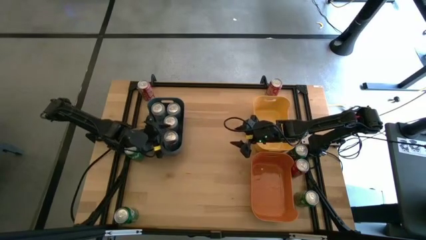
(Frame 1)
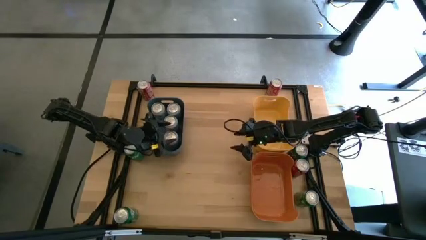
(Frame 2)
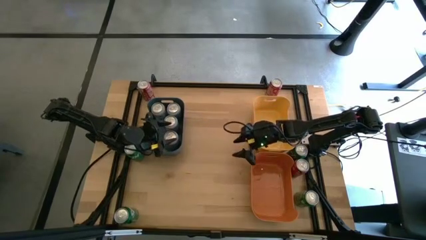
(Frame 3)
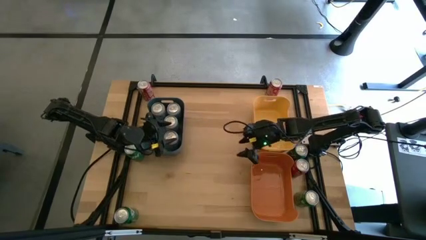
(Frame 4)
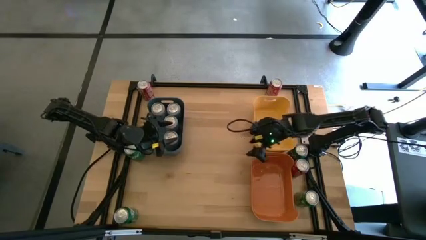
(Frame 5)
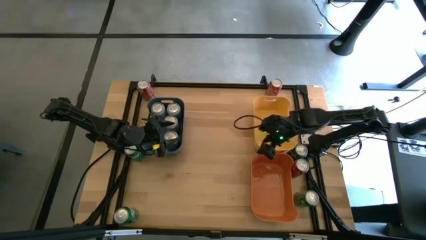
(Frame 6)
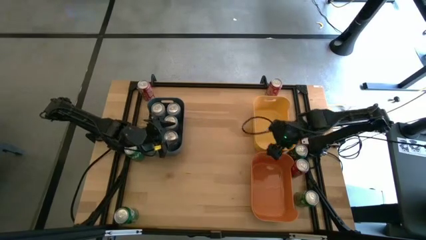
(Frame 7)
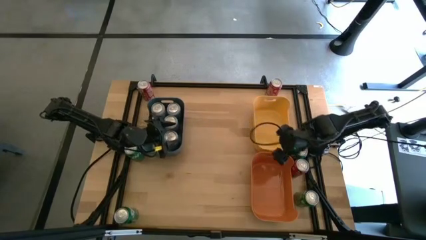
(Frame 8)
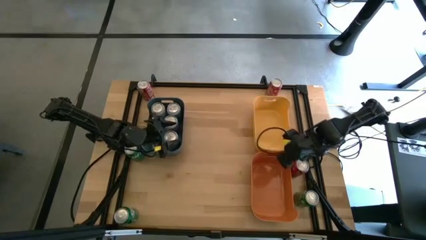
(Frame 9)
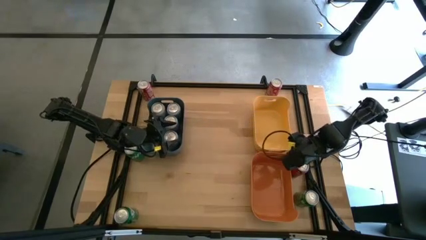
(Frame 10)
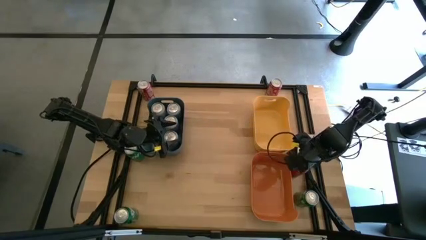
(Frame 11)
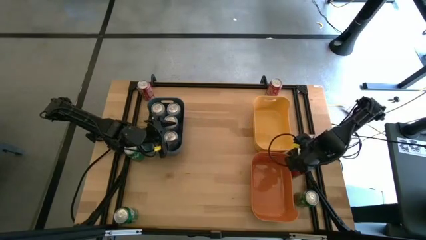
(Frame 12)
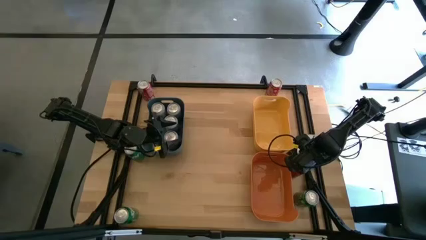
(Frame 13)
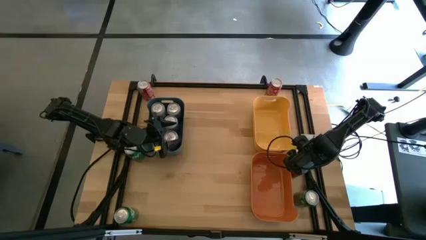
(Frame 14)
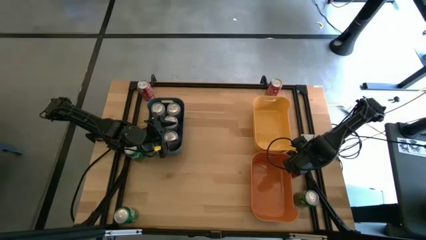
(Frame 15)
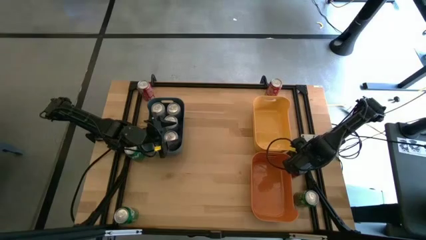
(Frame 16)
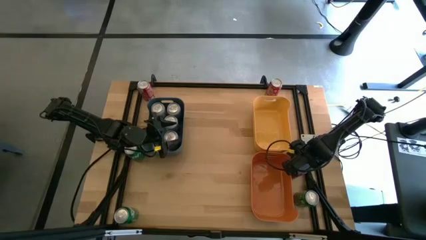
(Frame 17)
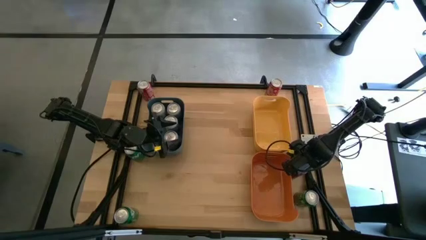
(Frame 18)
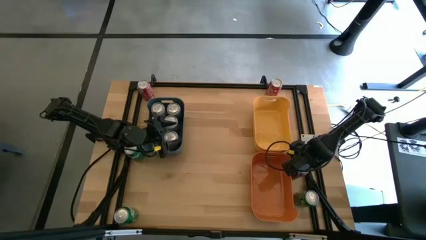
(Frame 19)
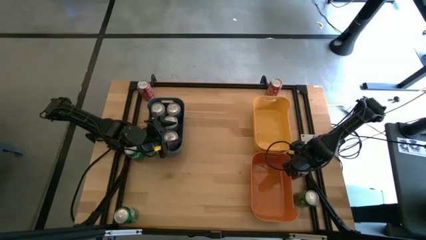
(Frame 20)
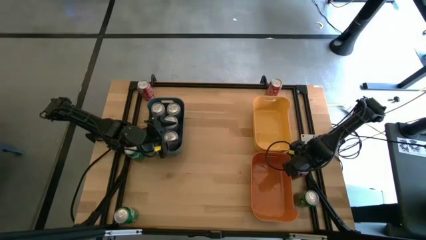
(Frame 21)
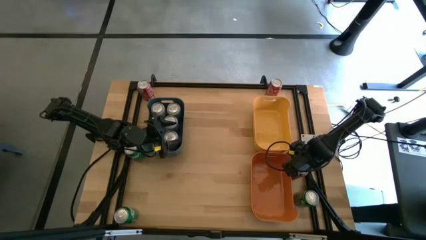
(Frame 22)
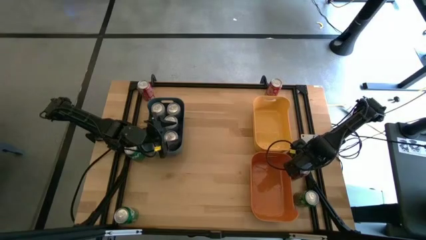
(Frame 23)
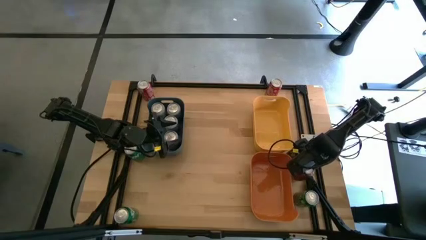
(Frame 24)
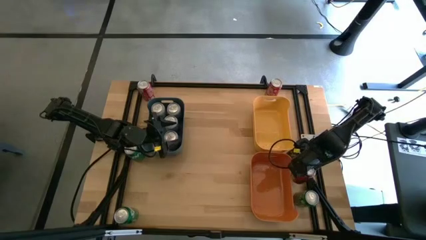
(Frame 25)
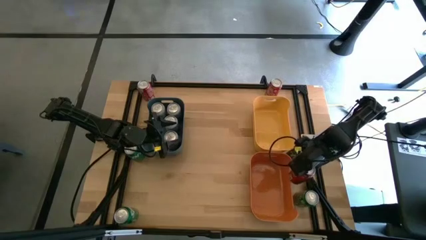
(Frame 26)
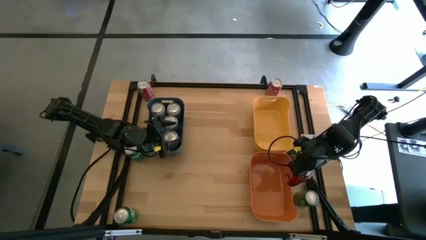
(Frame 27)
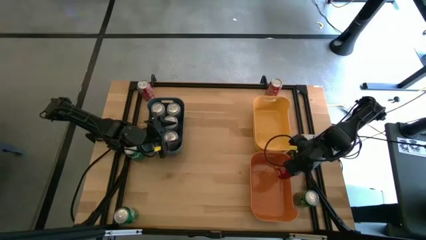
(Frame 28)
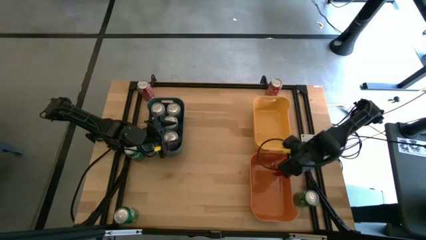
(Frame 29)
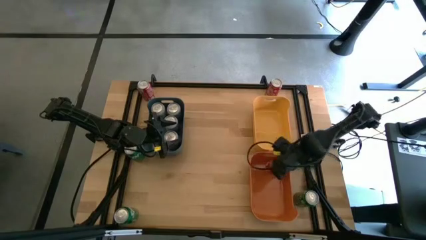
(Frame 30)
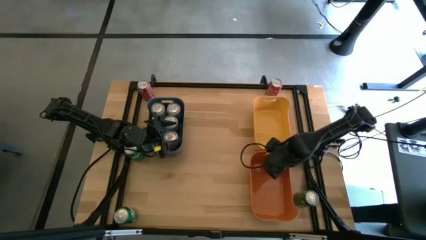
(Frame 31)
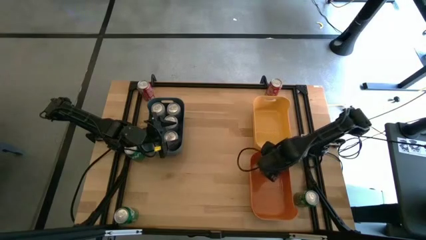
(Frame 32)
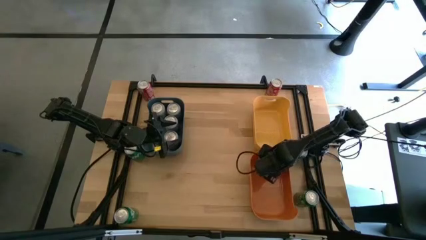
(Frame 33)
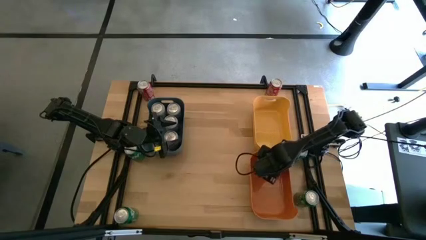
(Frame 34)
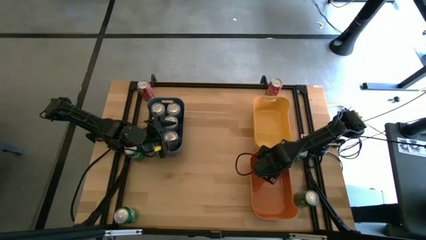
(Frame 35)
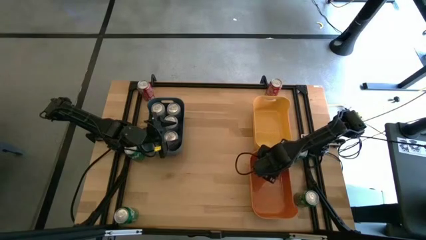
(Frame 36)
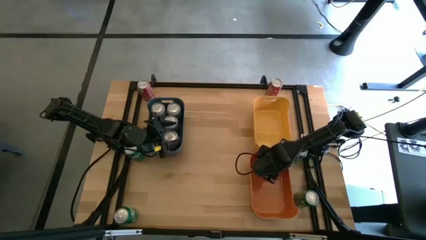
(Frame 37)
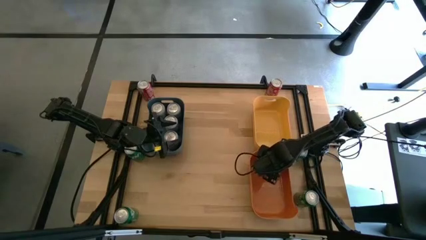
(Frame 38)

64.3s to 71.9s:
Task: Sort soda cans
Put the bottom right red soda can into the orange bin

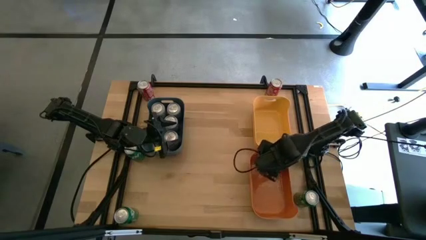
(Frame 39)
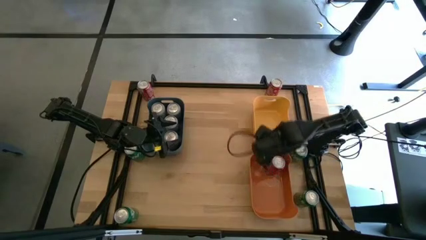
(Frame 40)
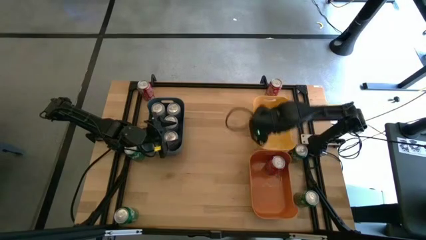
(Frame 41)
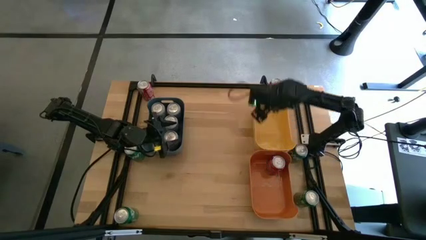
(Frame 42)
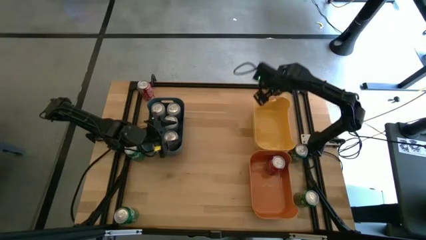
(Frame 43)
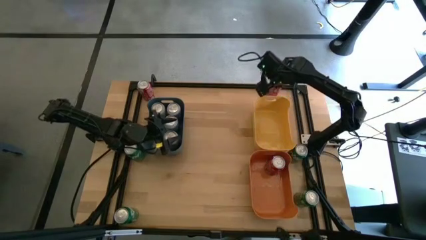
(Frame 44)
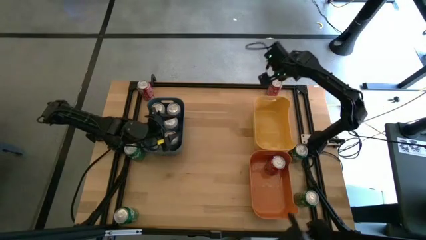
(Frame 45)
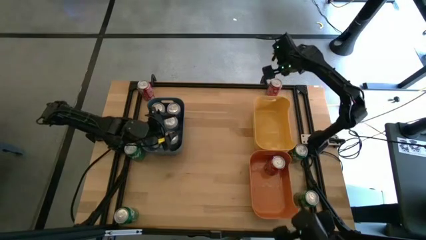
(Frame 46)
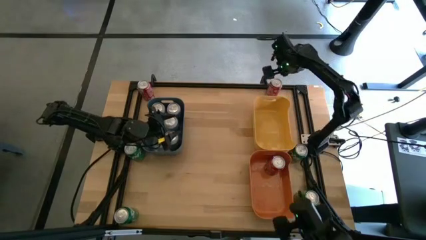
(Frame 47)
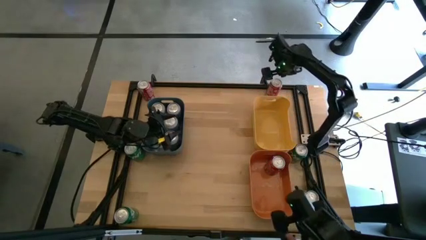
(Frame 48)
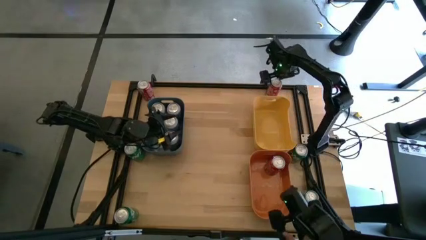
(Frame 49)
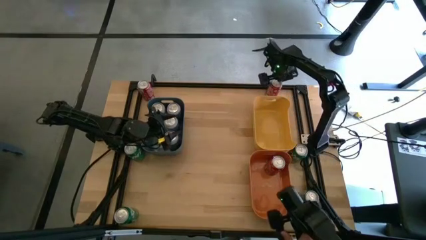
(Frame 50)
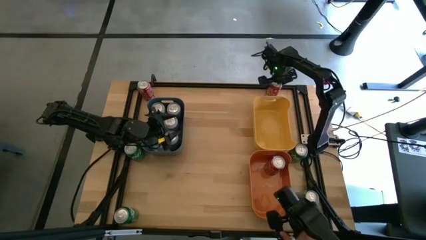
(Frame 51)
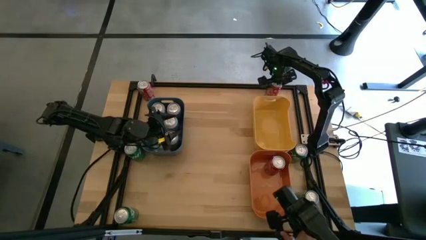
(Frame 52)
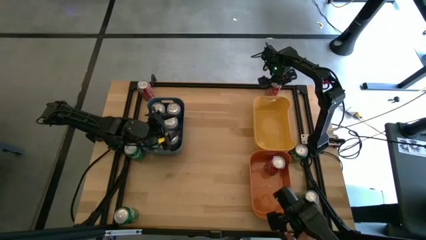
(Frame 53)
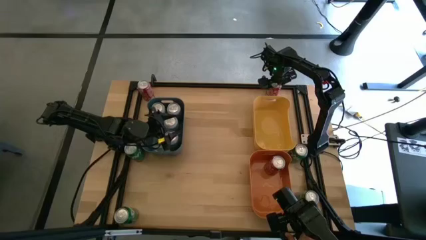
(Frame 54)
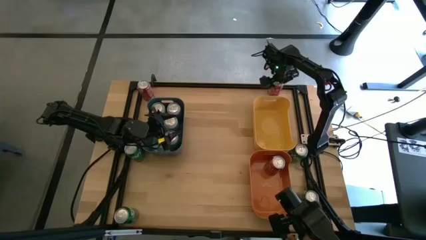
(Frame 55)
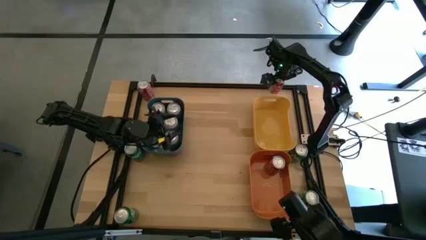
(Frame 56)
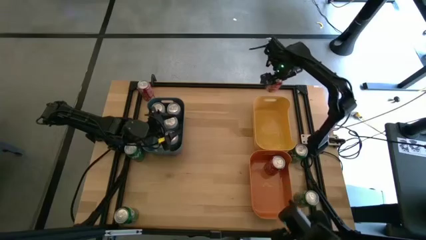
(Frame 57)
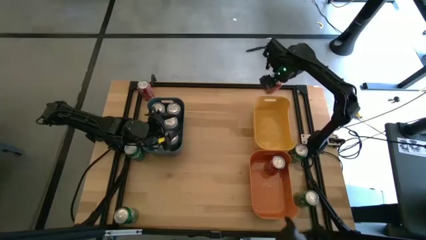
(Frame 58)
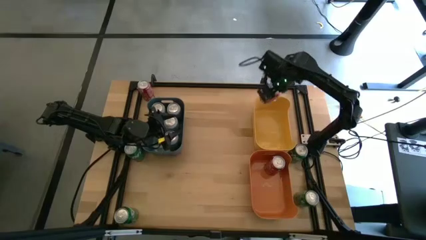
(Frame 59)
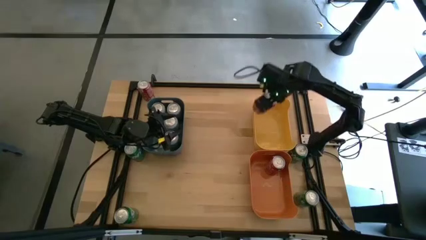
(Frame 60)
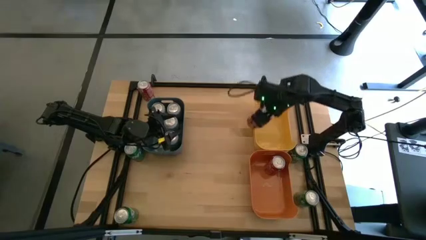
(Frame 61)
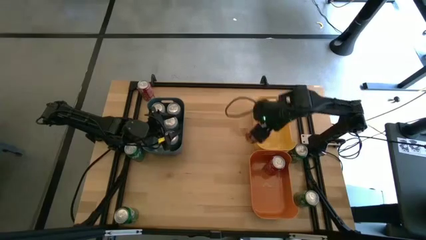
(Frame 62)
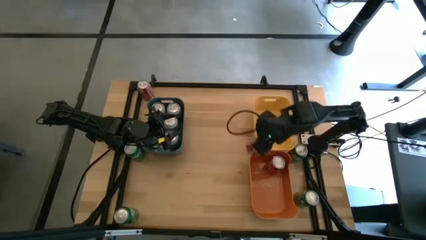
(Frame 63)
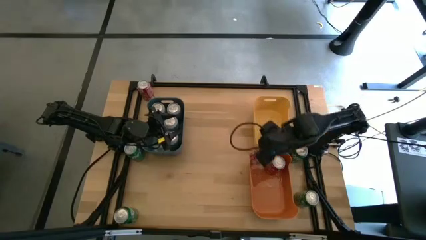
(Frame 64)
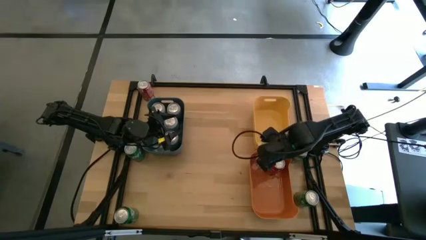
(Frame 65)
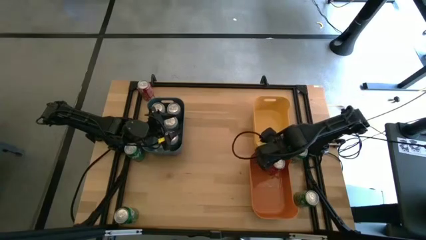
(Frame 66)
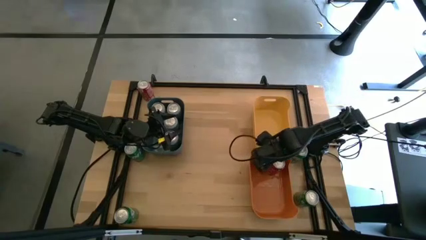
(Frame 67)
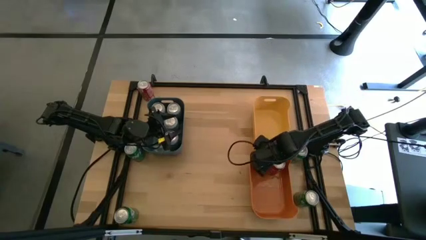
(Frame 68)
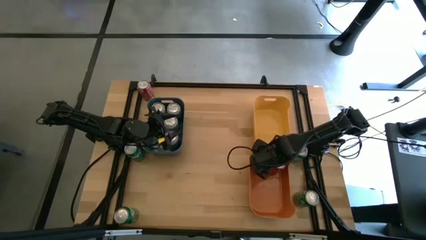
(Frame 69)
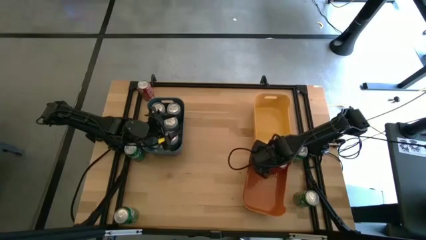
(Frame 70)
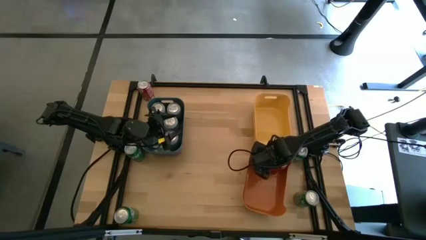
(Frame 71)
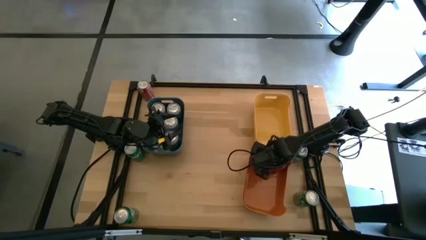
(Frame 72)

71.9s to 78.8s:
Put the top right red soda can into the orange bin

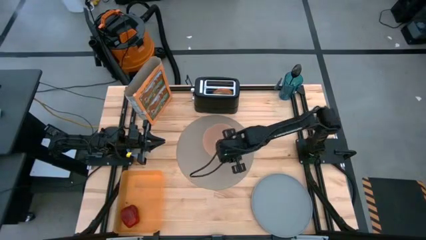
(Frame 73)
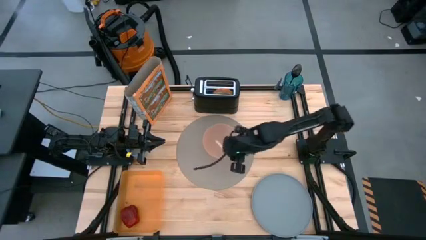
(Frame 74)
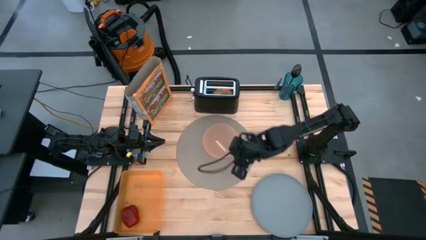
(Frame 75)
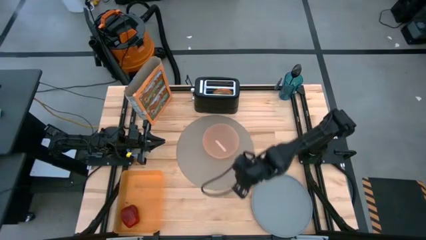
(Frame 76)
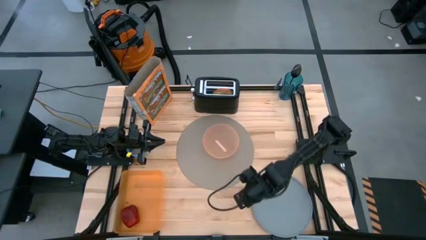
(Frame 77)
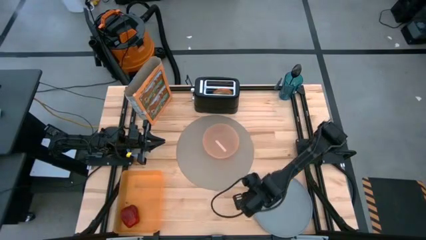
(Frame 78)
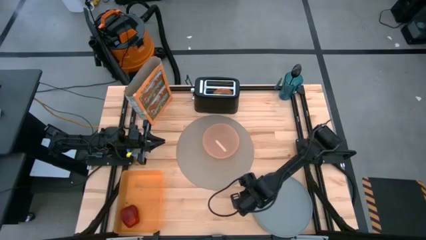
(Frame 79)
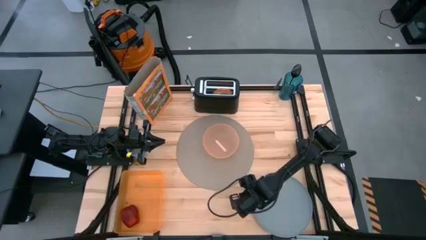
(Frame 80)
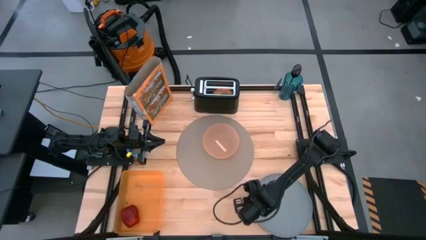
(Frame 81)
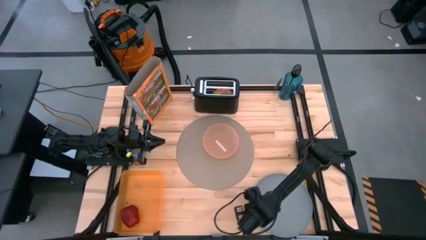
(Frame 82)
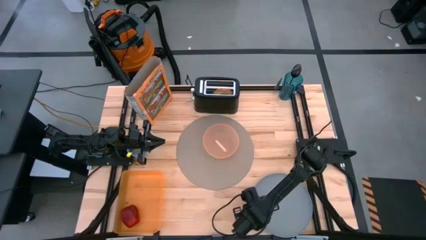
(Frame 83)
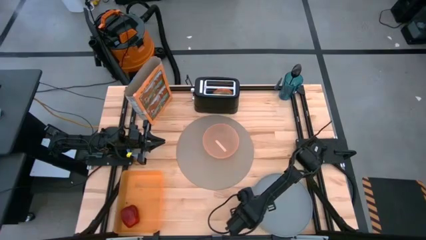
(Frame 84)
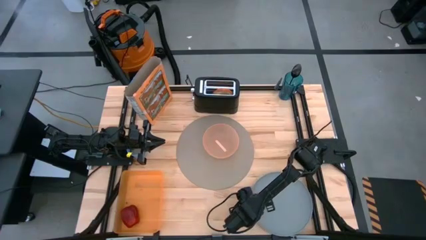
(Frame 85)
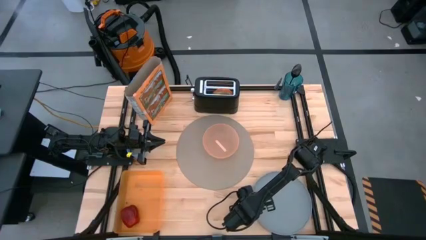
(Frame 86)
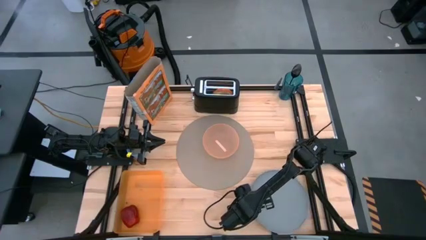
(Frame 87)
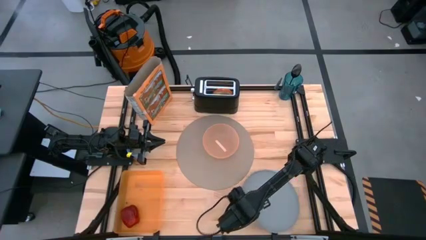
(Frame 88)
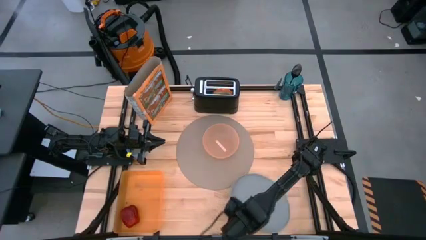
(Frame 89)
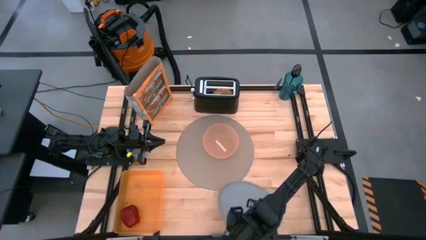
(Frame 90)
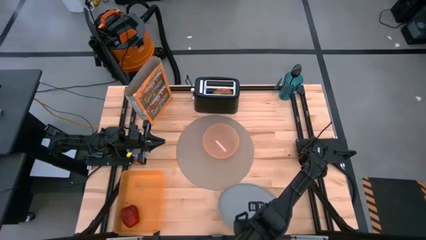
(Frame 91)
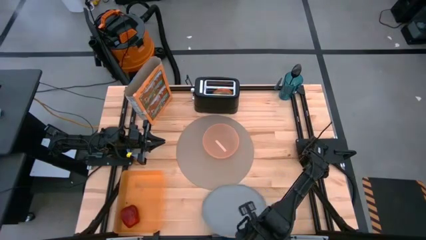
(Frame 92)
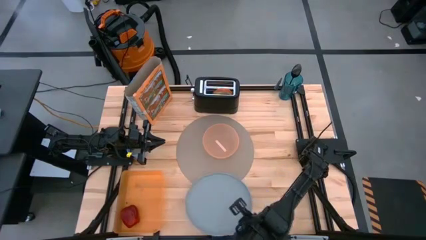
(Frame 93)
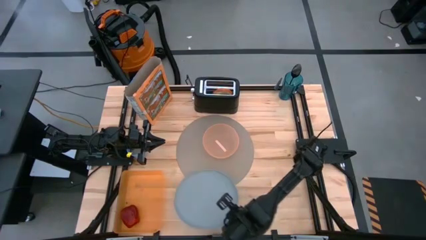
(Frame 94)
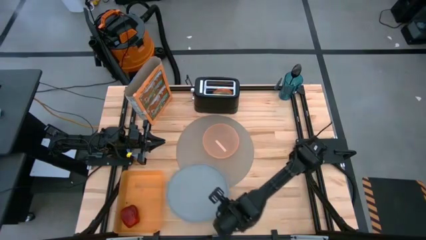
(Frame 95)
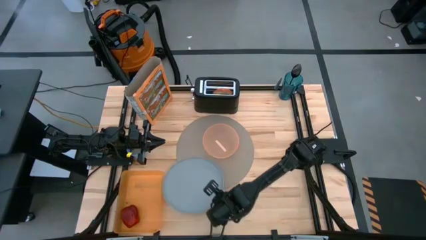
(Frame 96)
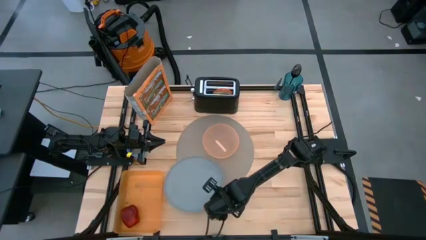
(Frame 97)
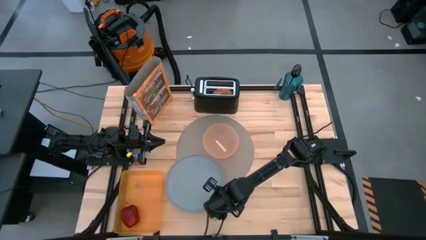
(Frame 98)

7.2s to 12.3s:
Task: Arrange a breakfast setting
Put the gray plate on the gray tablemat
